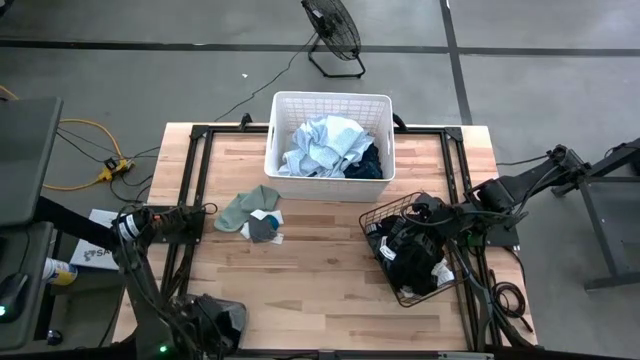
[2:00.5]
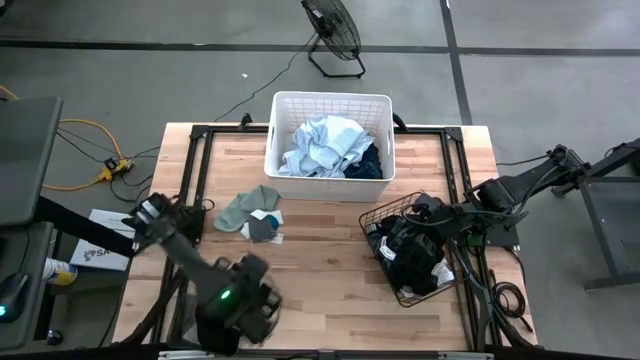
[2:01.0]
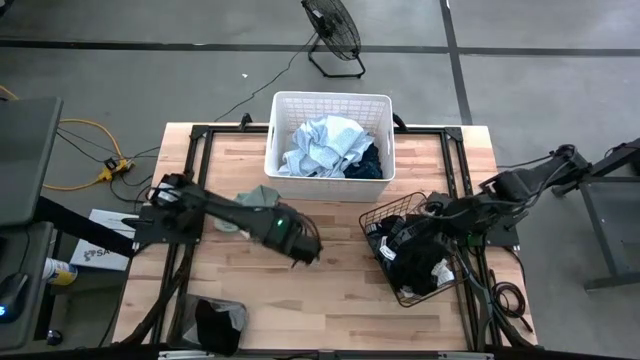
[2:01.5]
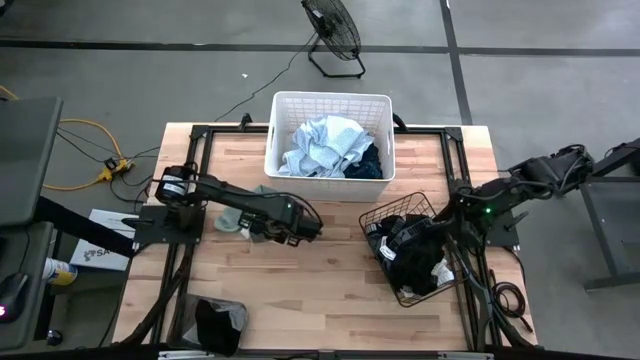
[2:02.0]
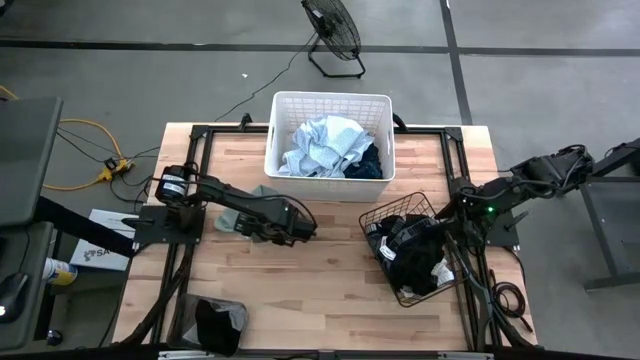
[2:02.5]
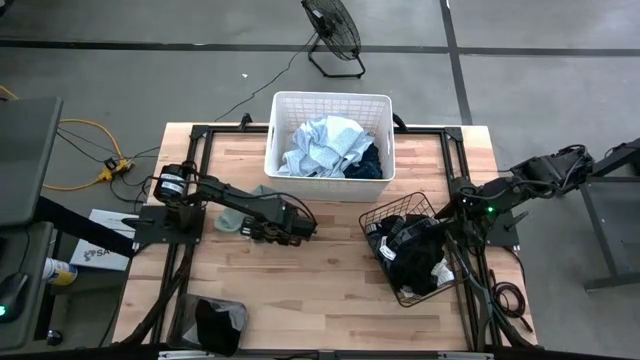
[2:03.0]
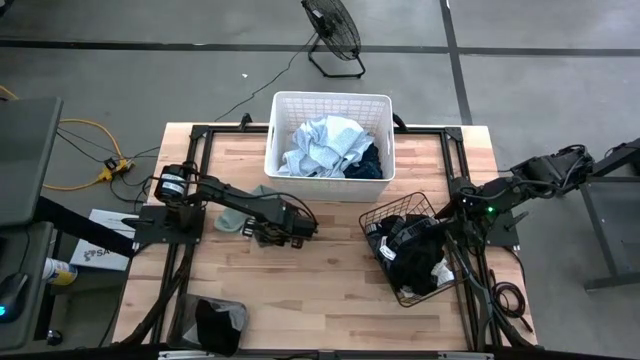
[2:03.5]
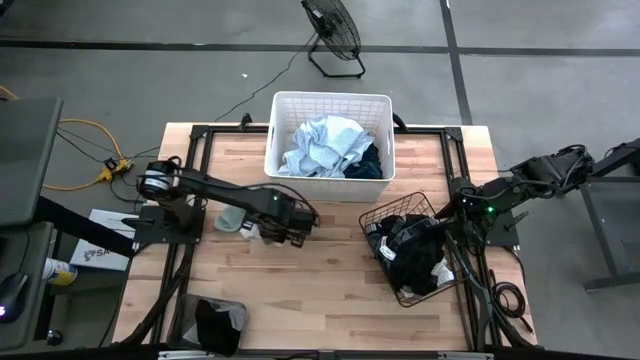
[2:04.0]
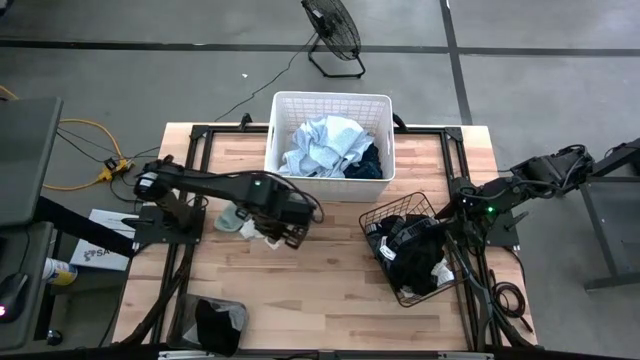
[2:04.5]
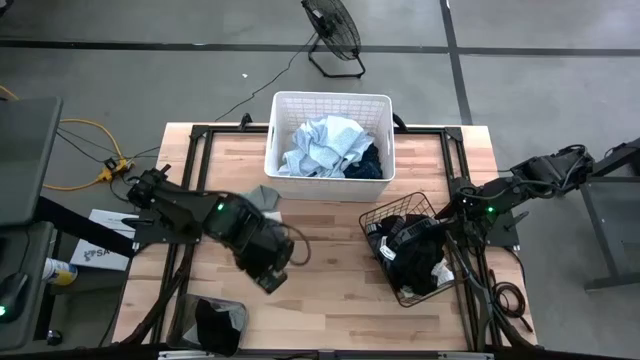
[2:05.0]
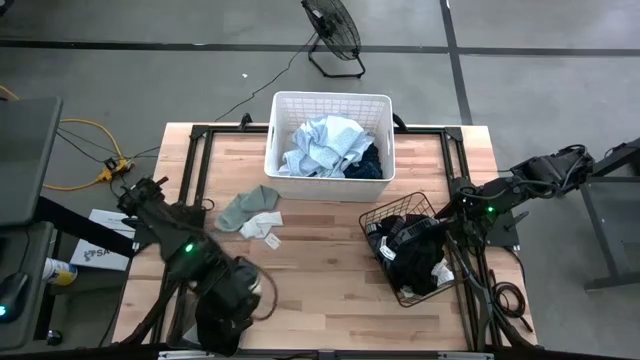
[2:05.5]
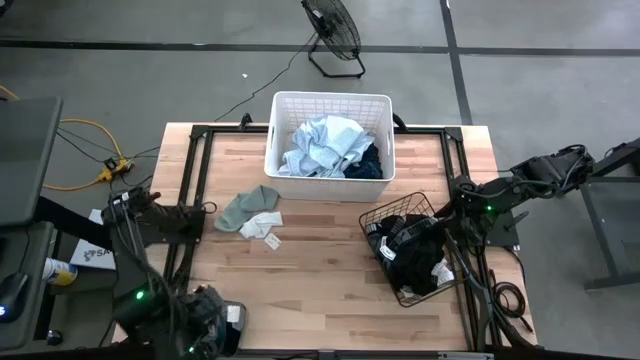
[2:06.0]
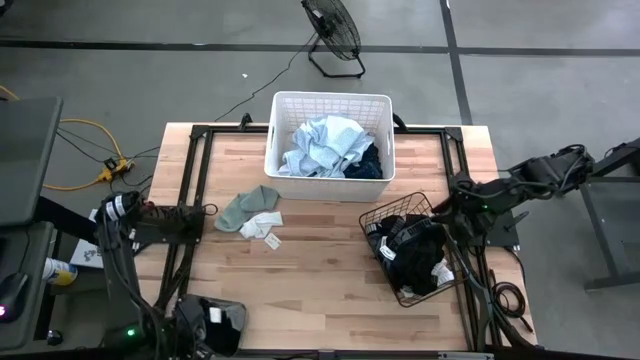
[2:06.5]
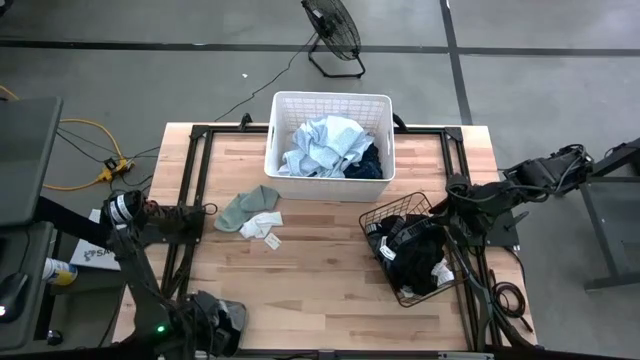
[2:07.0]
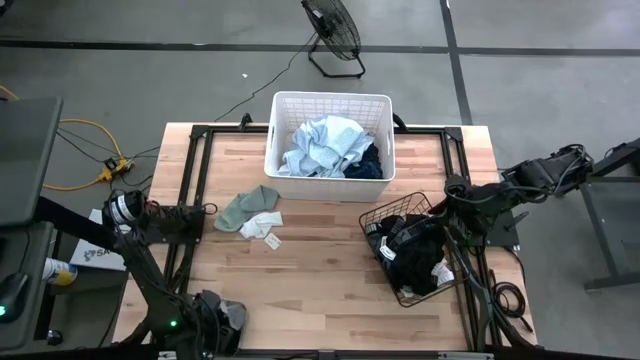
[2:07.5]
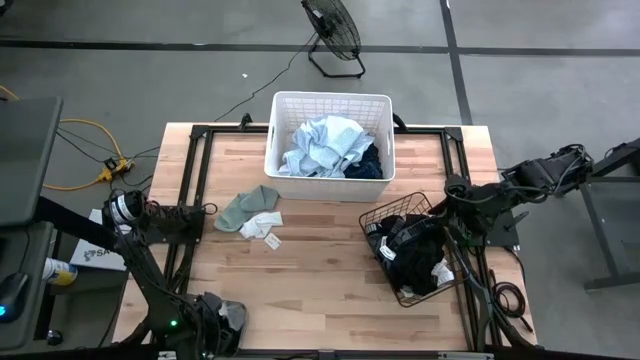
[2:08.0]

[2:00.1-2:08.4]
Task: Pick & Place Cloths
Put the dark gray sock into the black bin

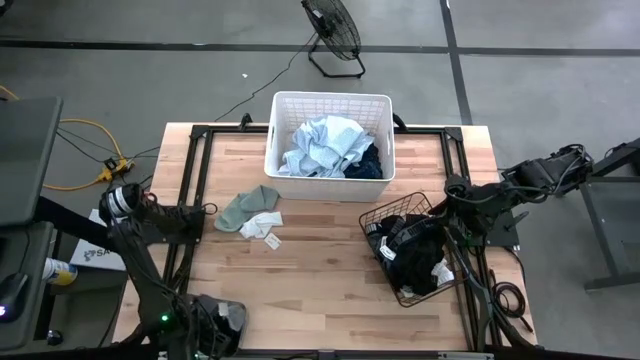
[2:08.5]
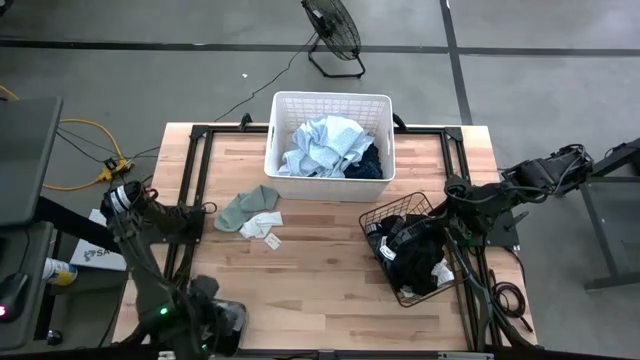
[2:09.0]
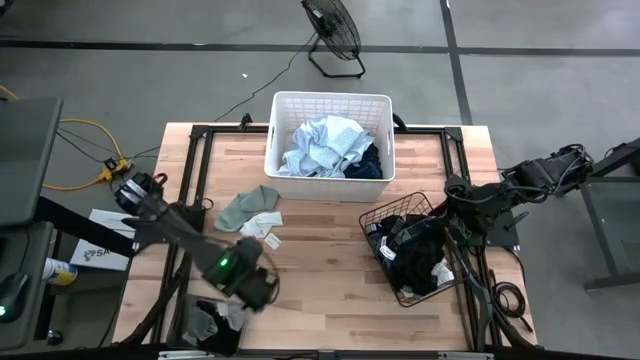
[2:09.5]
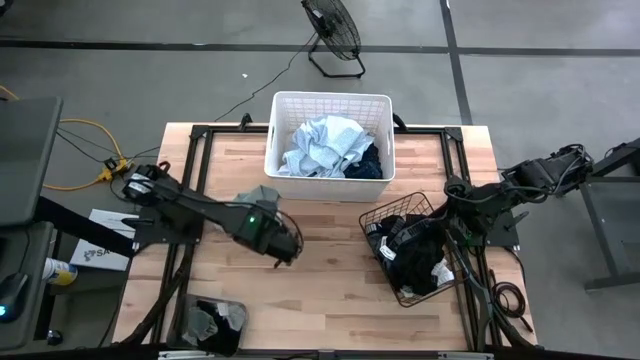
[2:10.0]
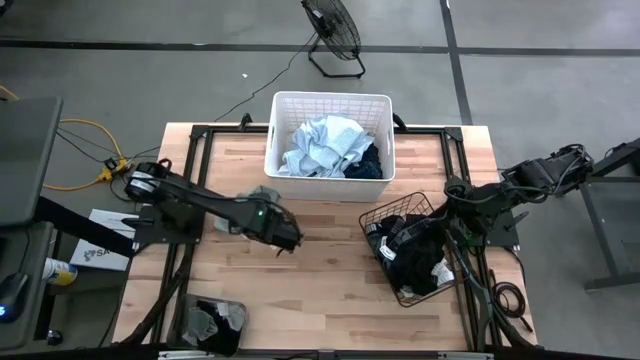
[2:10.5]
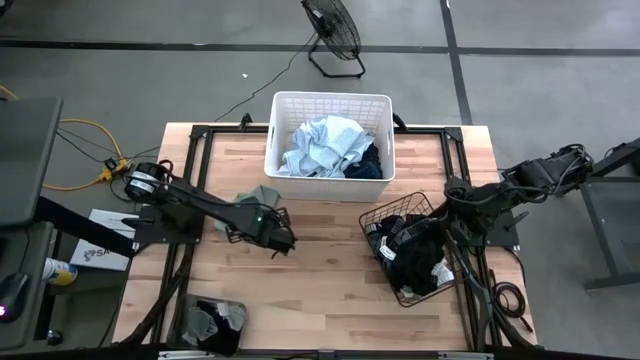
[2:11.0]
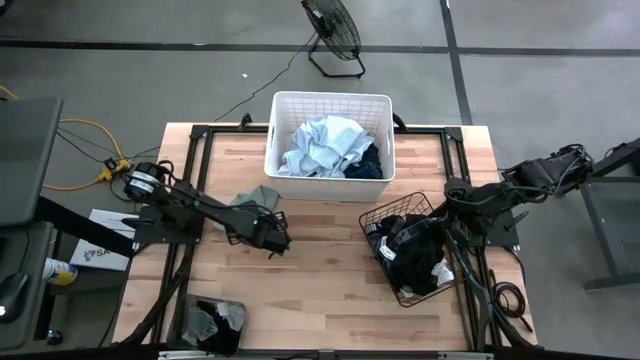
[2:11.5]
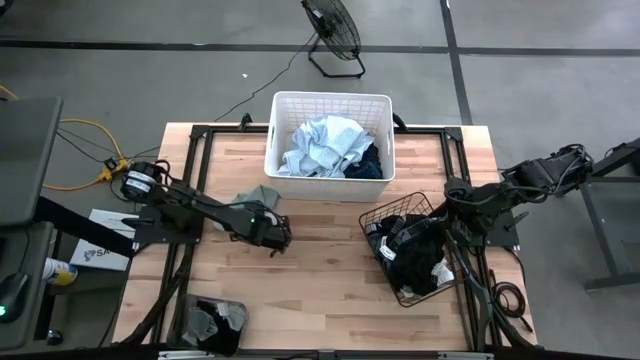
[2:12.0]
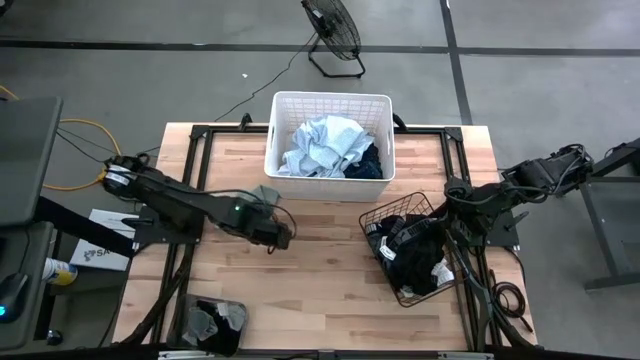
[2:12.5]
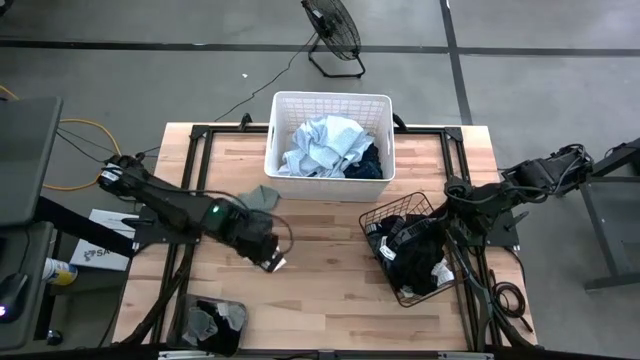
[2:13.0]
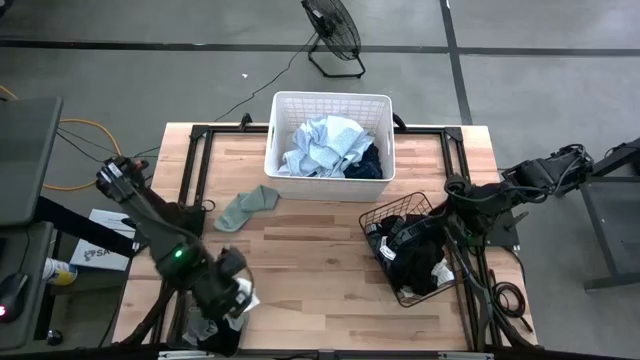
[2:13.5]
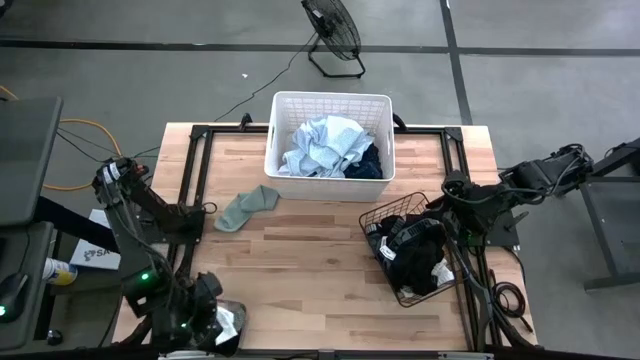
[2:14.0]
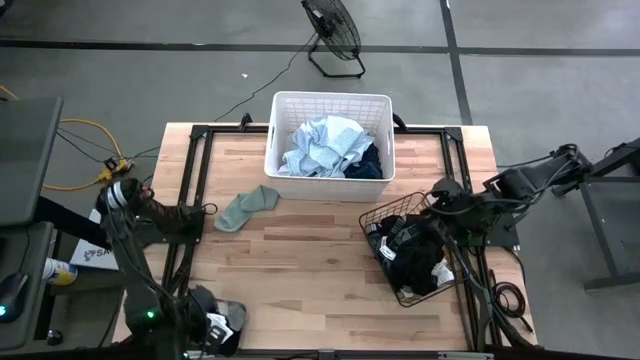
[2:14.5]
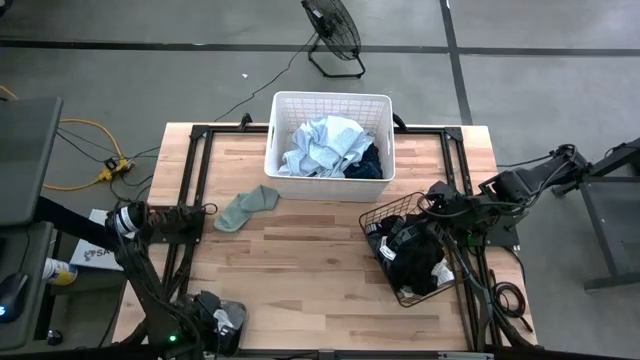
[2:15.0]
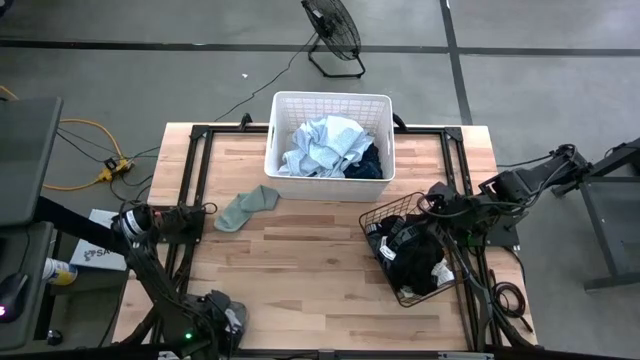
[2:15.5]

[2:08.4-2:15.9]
Put the white sock into the black bin

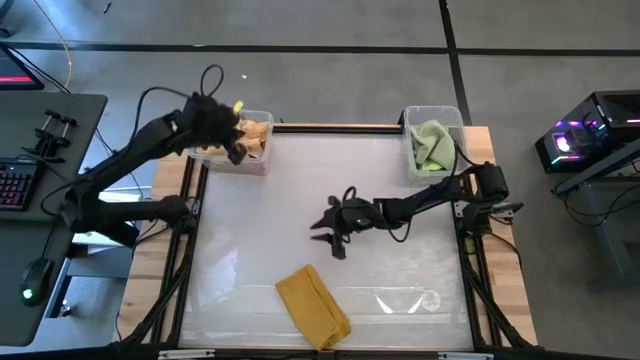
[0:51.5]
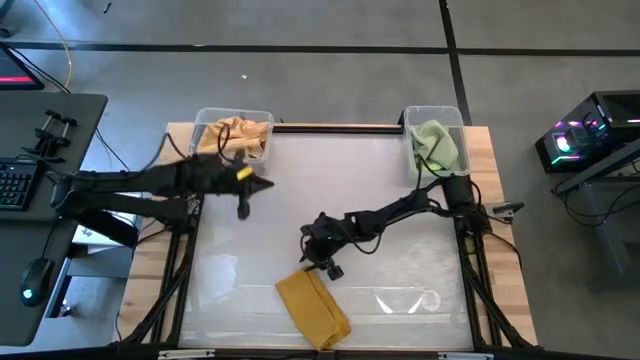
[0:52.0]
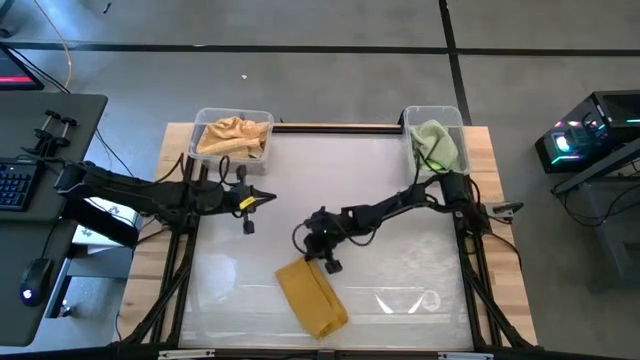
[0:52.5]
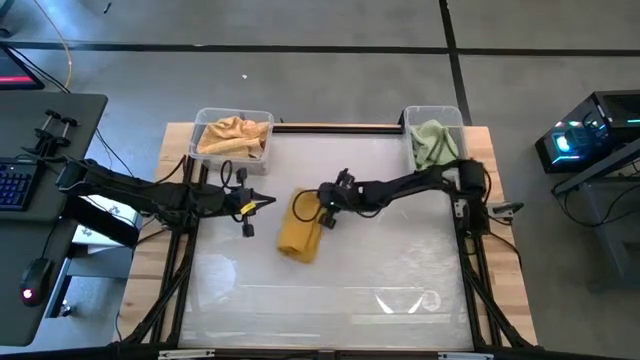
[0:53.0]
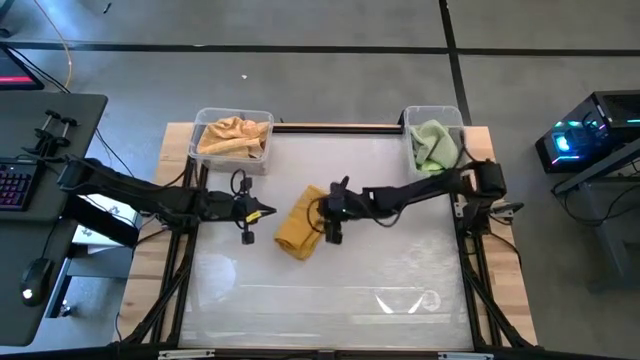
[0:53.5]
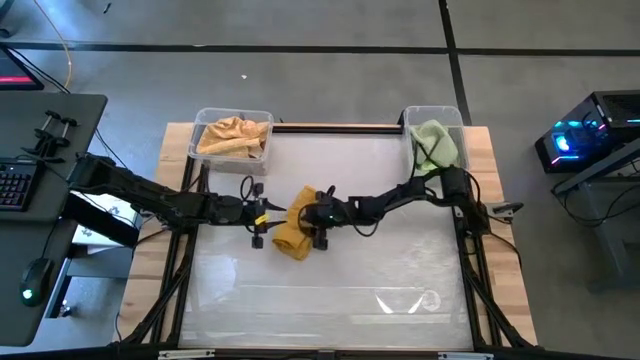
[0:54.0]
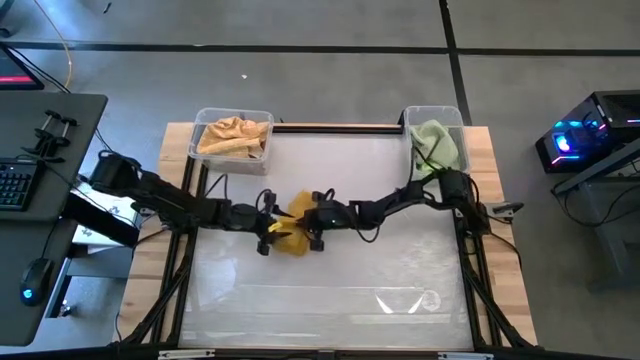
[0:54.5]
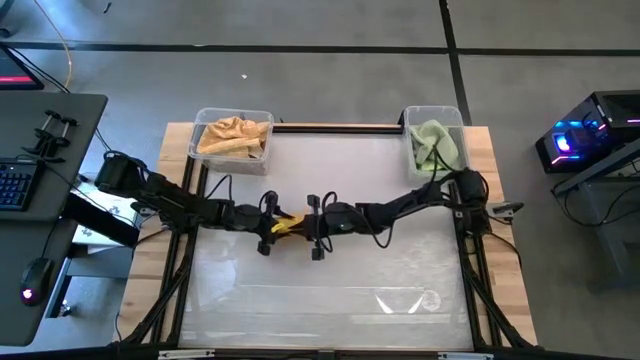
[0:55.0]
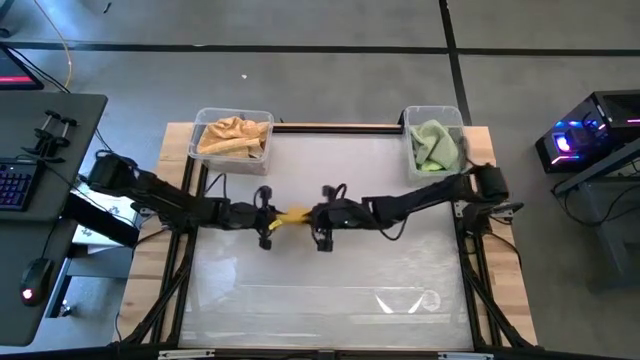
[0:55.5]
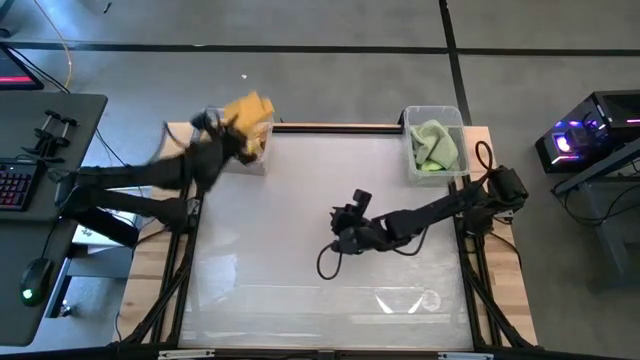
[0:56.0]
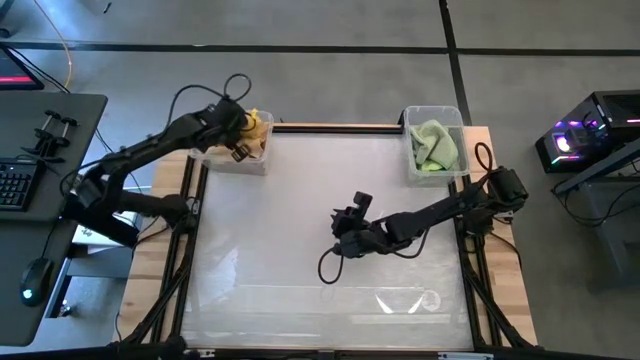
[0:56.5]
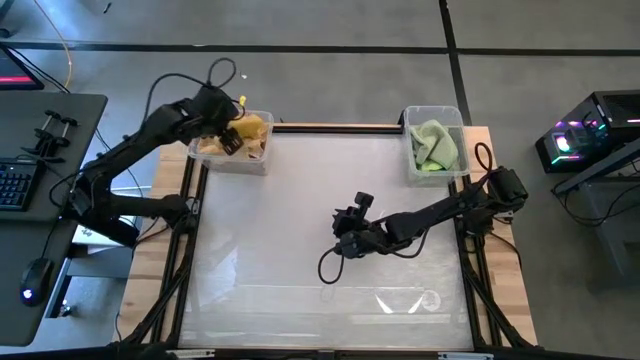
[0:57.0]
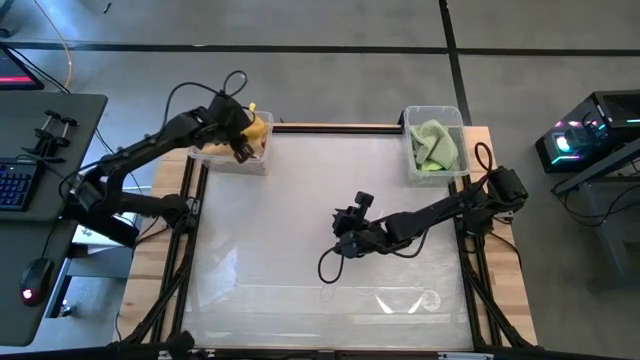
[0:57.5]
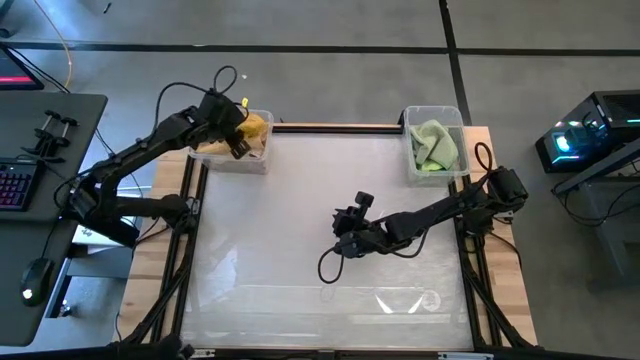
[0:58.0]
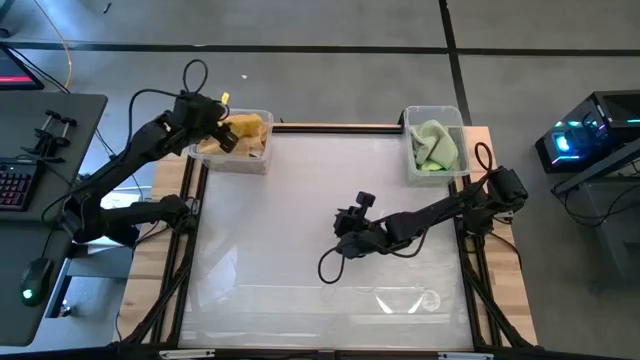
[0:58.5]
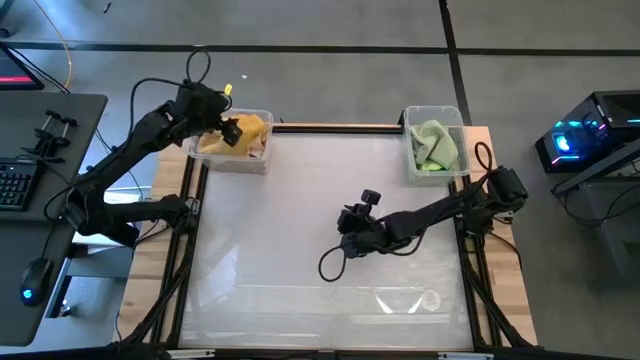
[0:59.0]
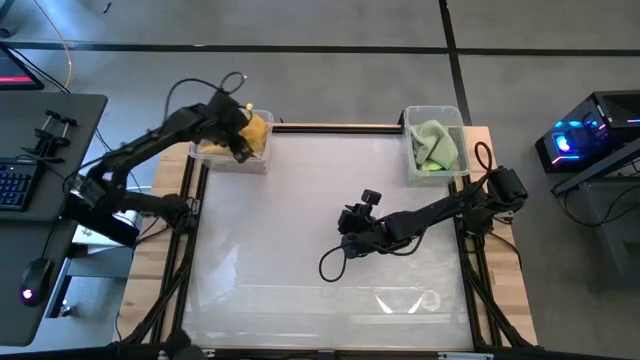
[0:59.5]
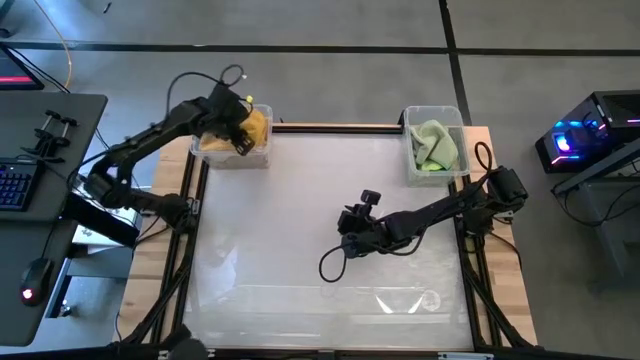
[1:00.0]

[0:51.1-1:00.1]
Task: Sort towels by color in basket
Put the dark yellow microfiber cloth into the left transparent bin
